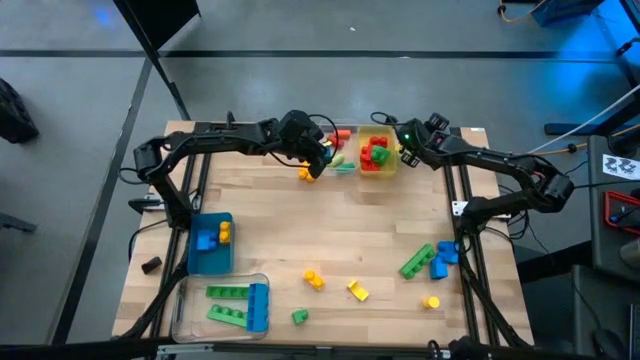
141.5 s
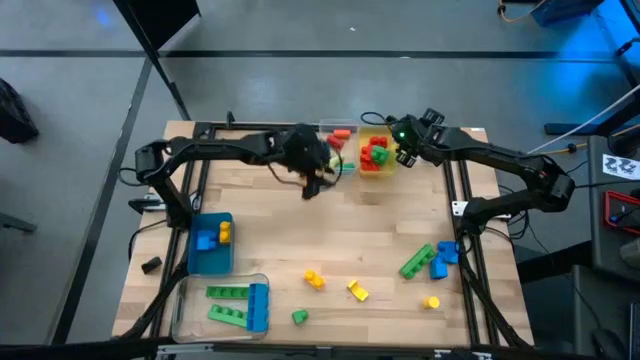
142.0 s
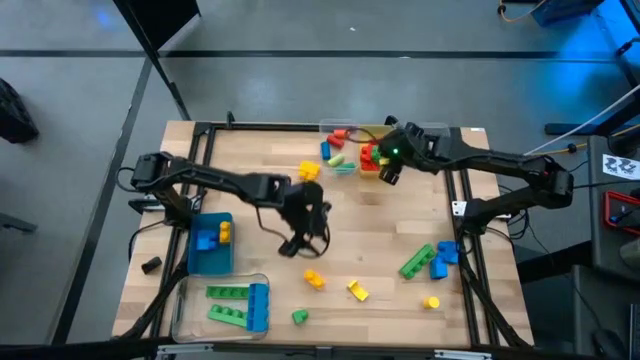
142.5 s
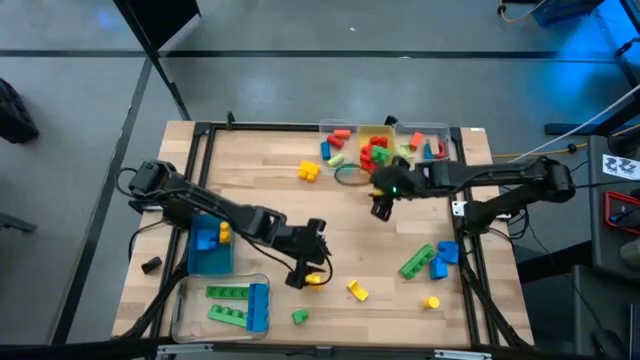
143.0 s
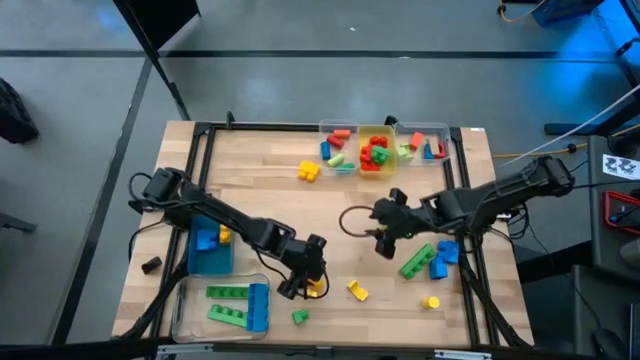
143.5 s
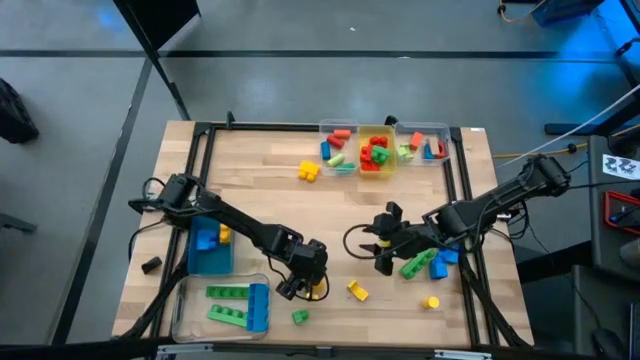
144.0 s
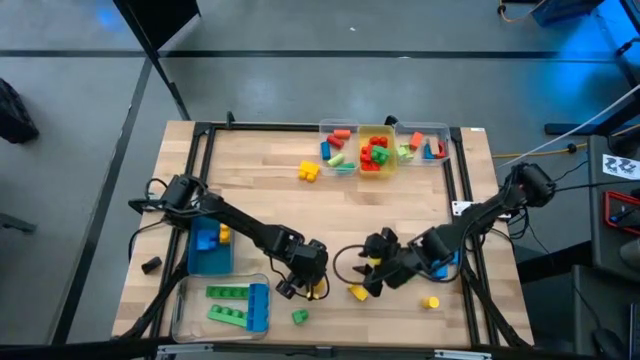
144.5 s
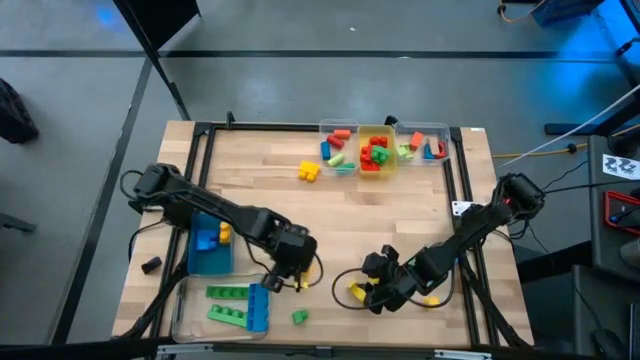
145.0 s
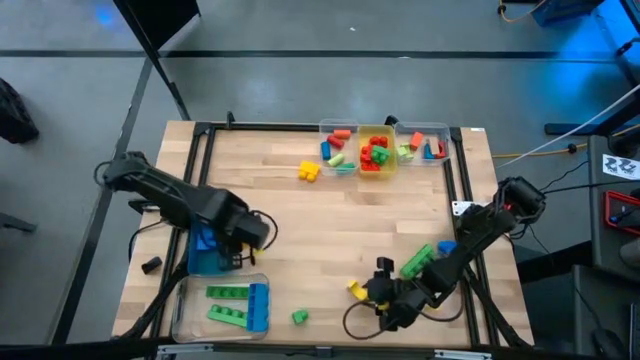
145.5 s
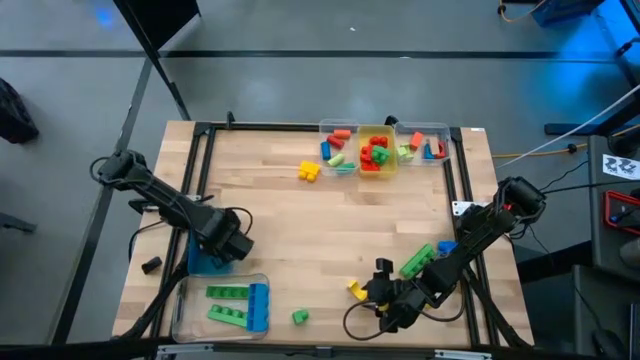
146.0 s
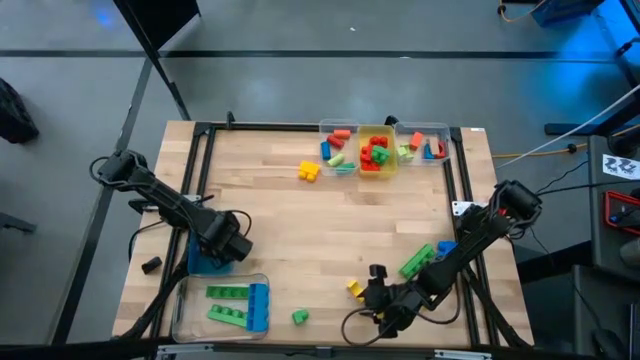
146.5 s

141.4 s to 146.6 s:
Task: Sort blocks by size
Put the yellow 2 stud game piece into the blue bin

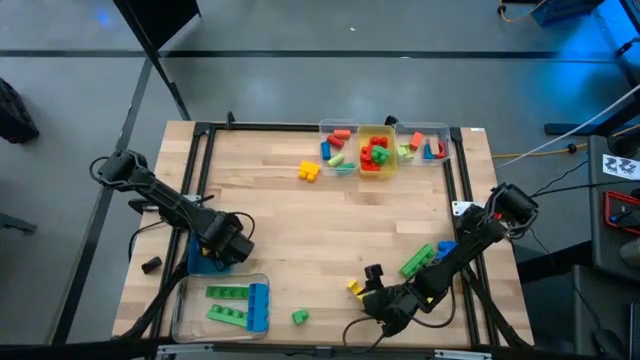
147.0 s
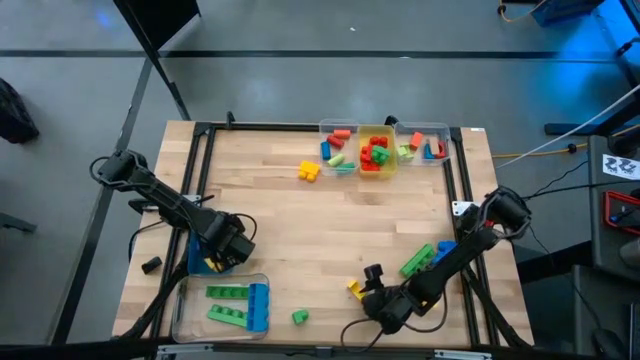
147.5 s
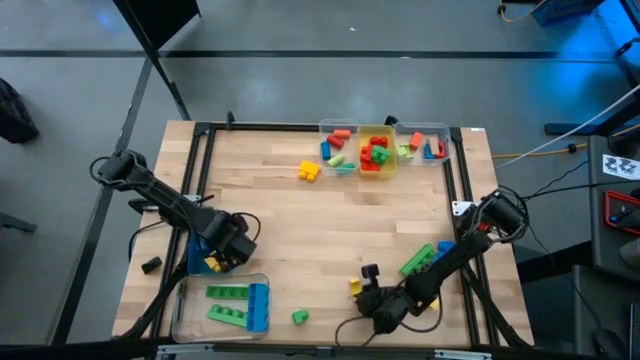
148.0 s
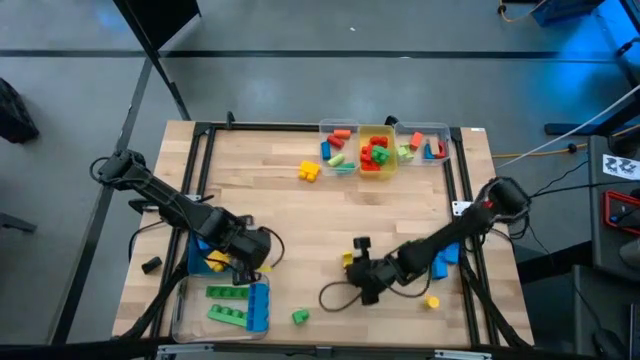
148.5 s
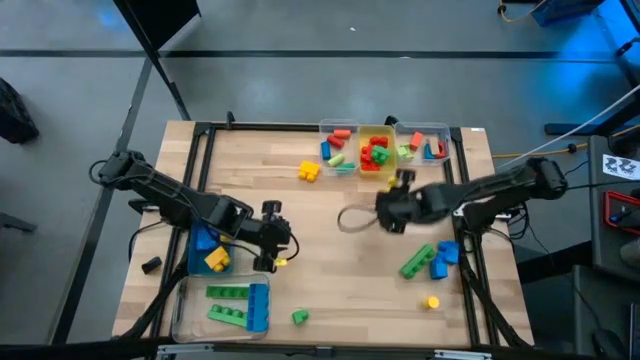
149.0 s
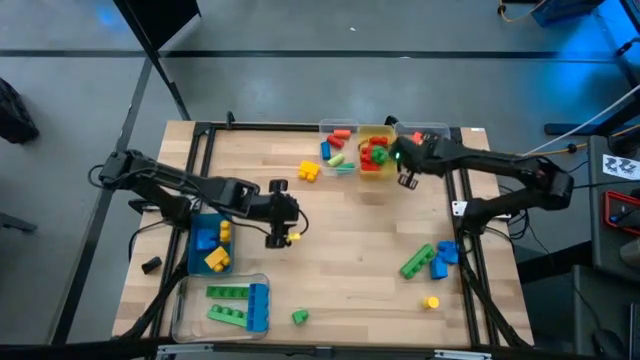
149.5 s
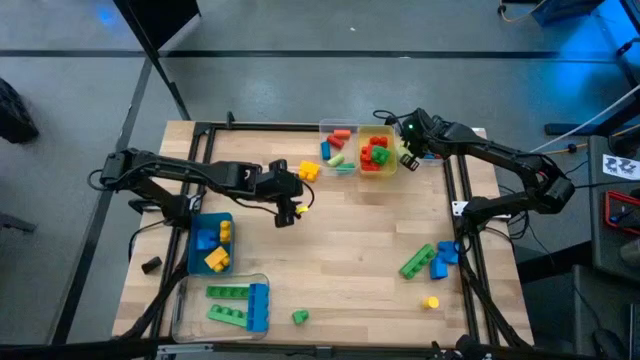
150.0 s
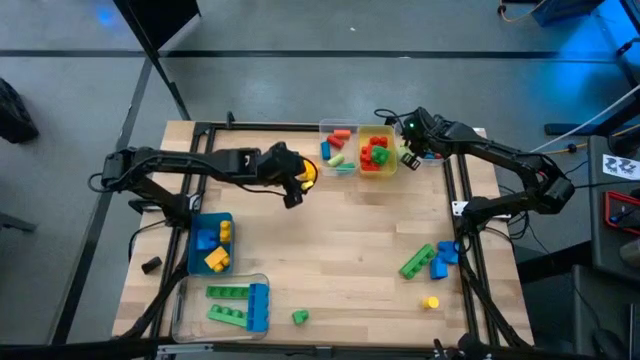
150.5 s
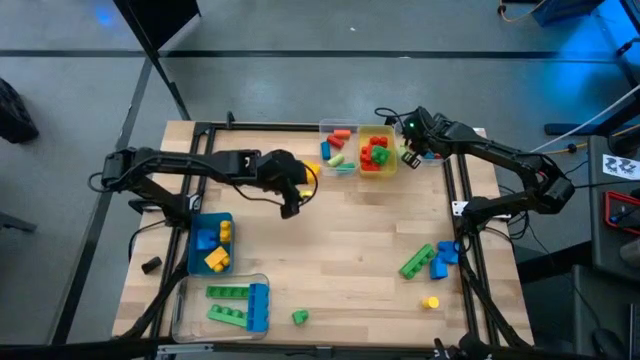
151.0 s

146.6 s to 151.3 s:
Put the yellow arch block into the top right transparent bin

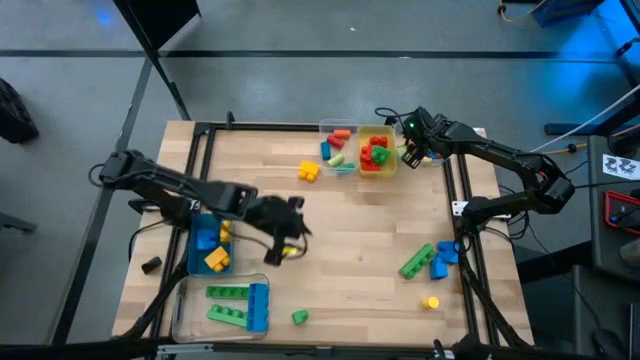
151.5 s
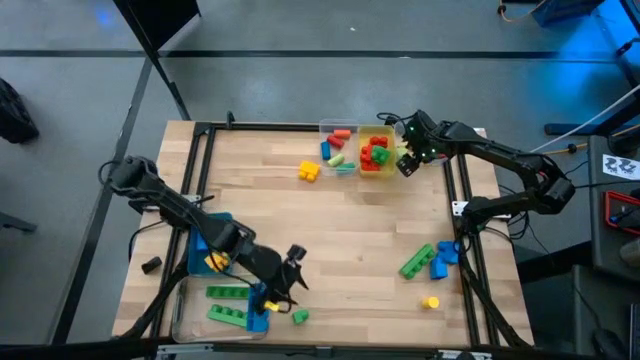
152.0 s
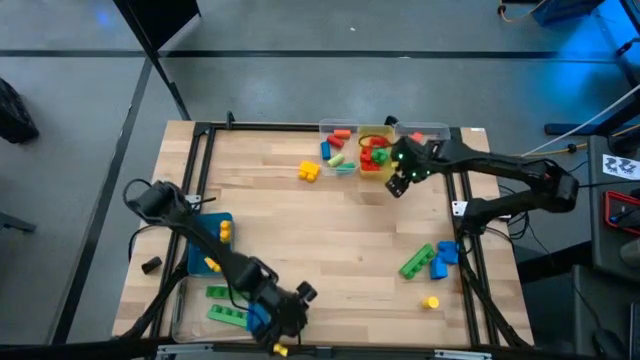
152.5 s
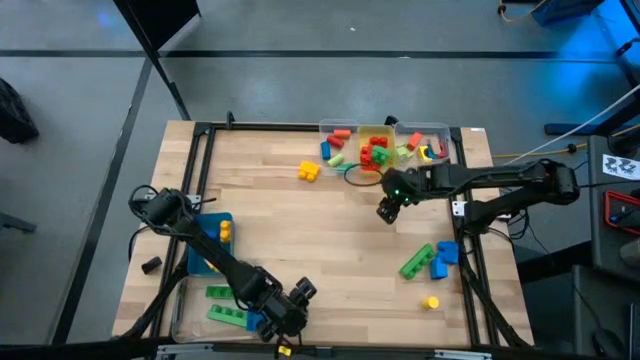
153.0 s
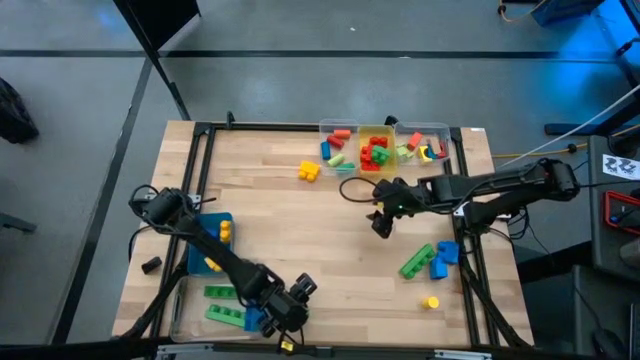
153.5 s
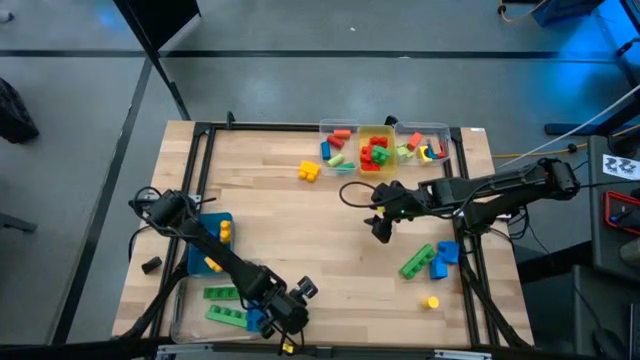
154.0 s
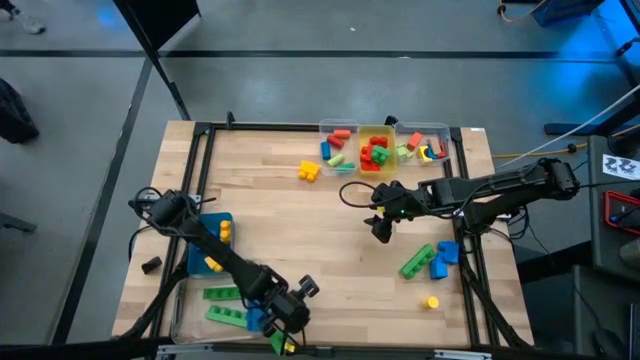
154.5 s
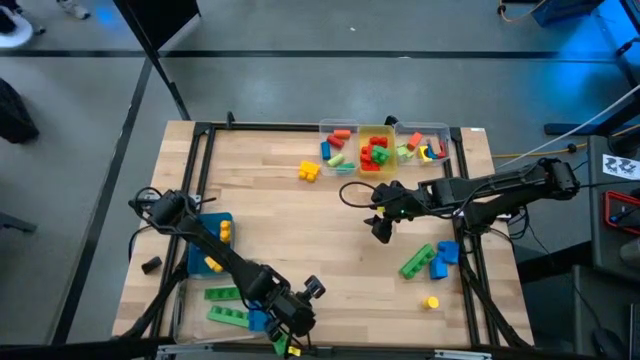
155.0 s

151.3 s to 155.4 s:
Put the green 2 stud game piece into the yellow bin

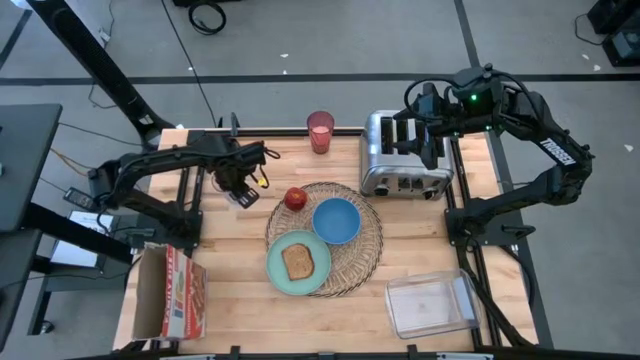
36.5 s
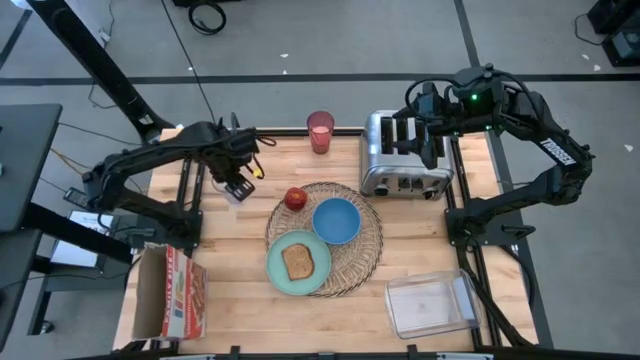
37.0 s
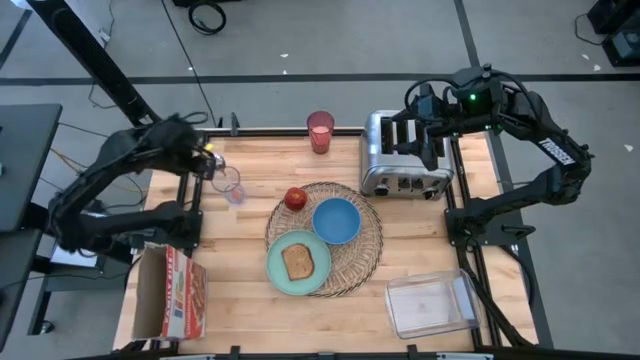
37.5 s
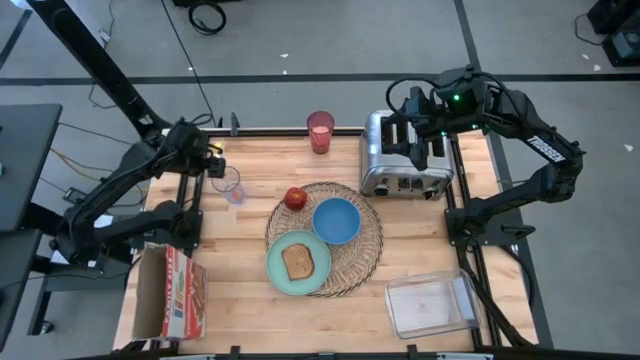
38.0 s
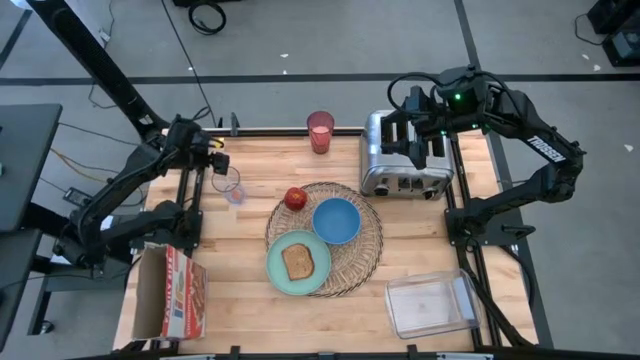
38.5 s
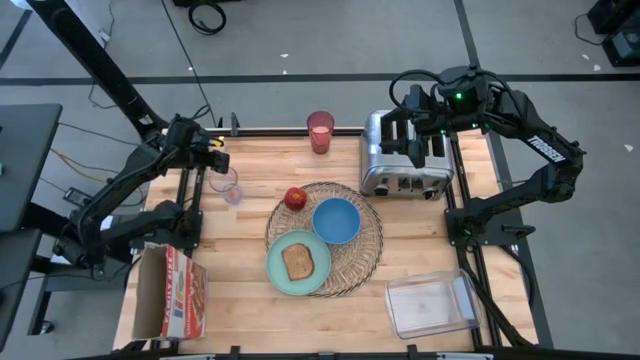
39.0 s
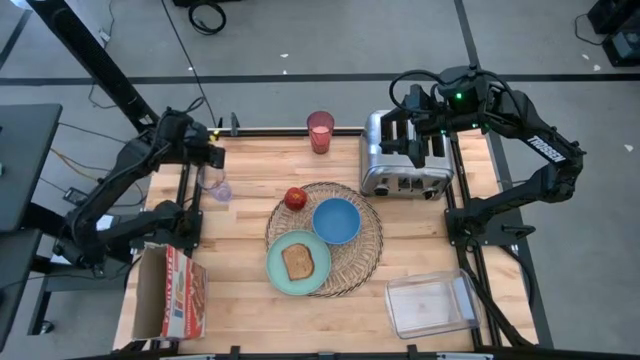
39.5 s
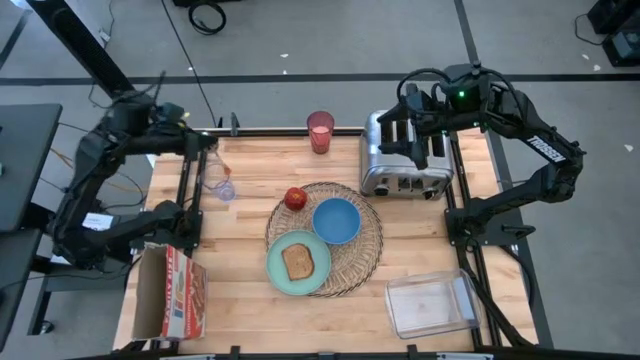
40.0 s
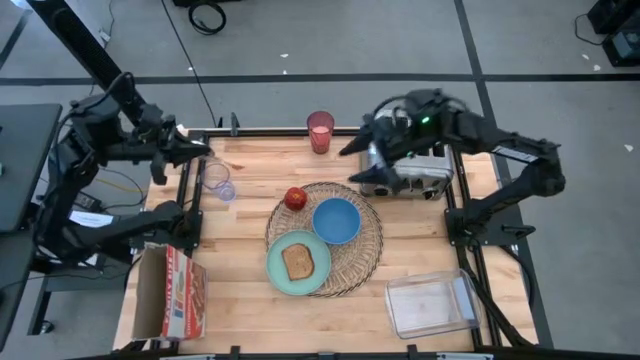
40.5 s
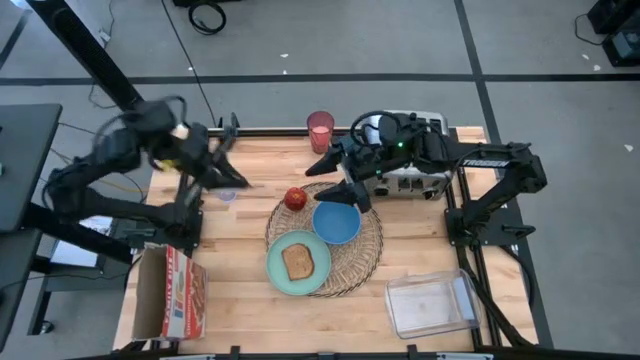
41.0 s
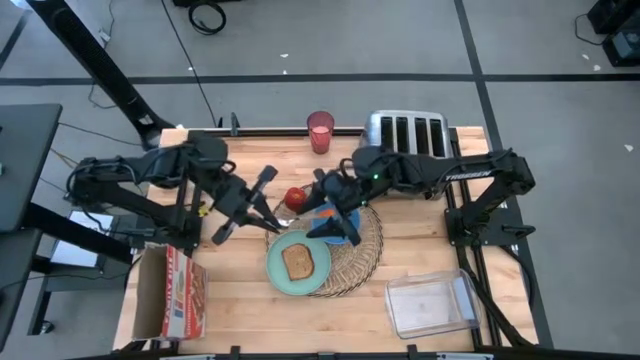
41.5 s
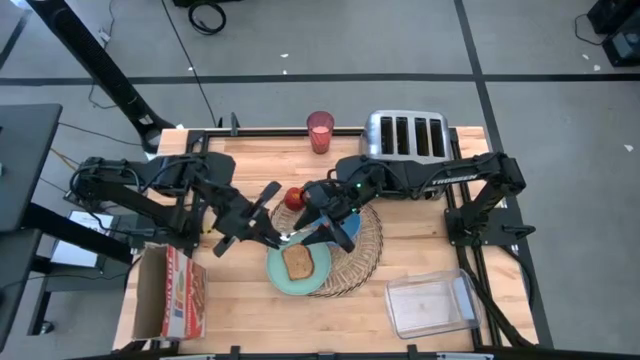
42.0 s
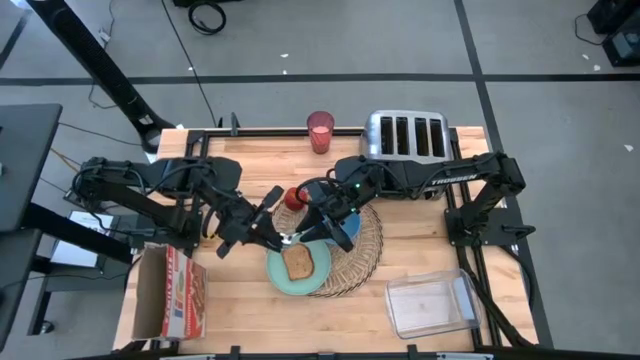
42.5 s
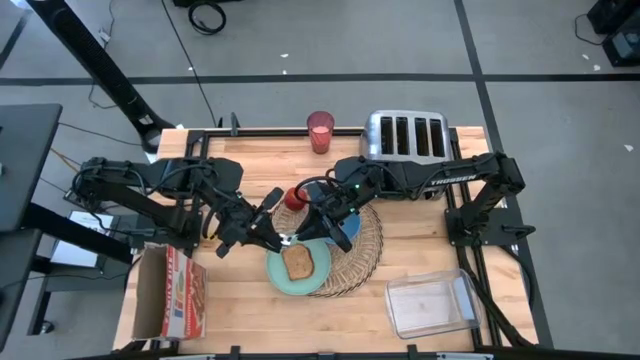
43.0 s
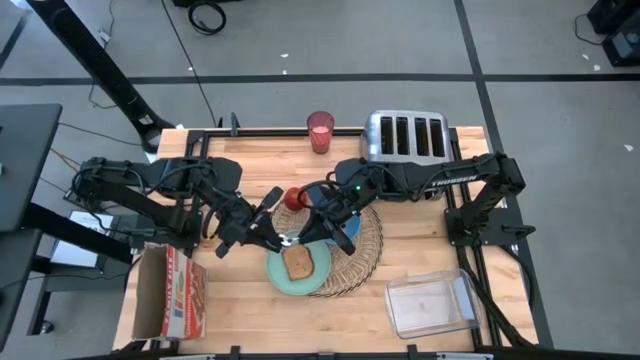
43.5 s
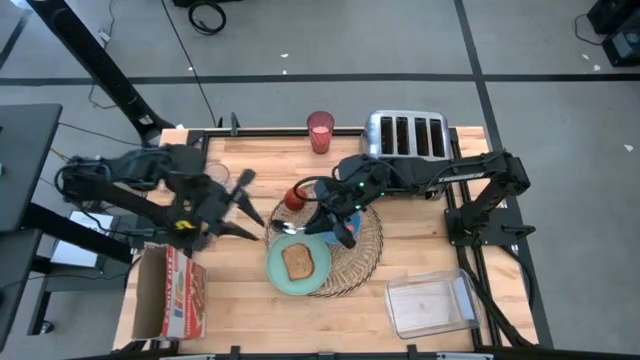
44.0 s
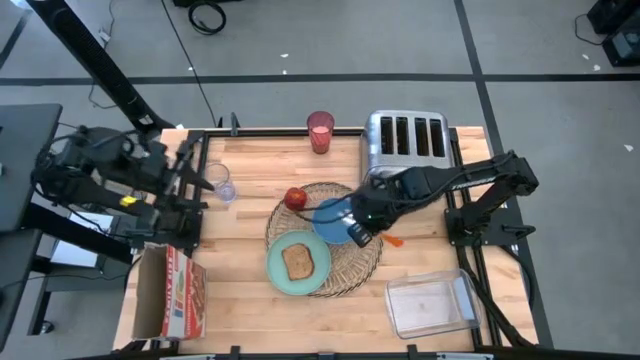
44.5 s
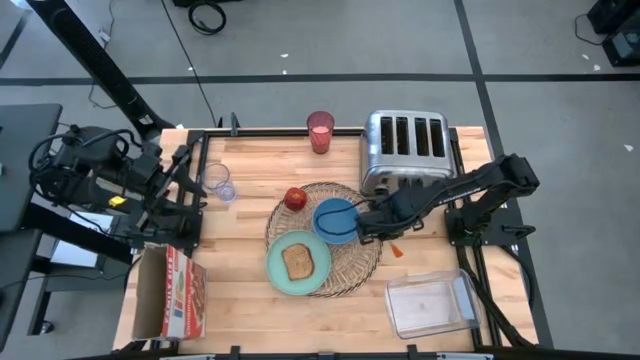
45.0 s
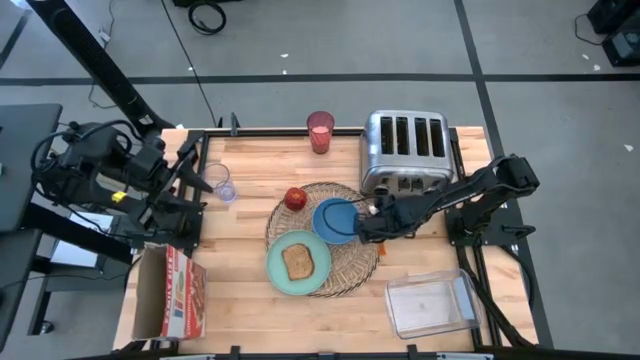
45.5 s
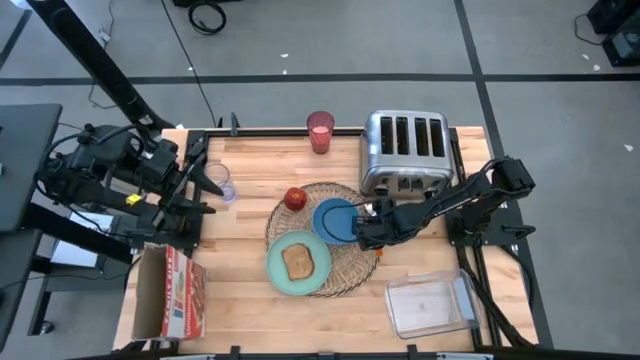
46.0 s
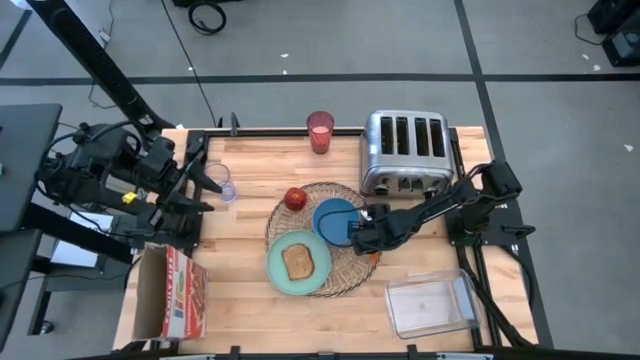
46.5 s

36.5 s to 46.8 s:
Task: Arrange a breakfast setting
Put the orange spoon on the placemat to the right of the blue bowl
